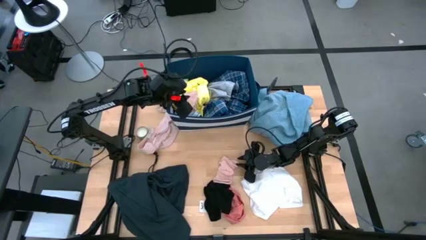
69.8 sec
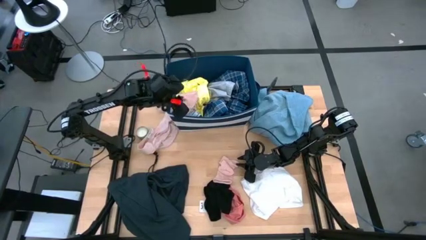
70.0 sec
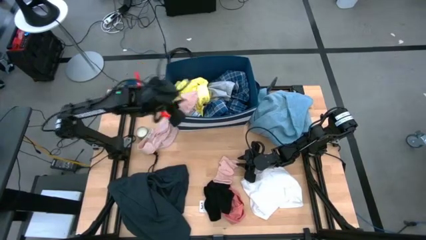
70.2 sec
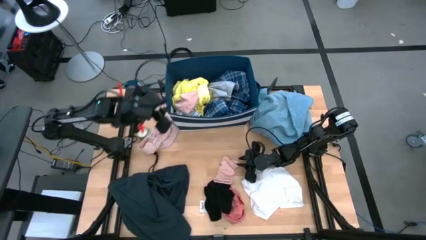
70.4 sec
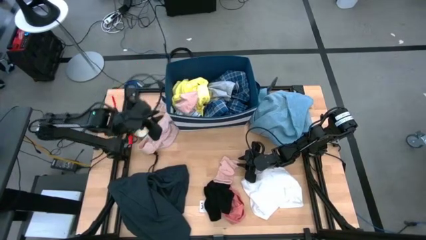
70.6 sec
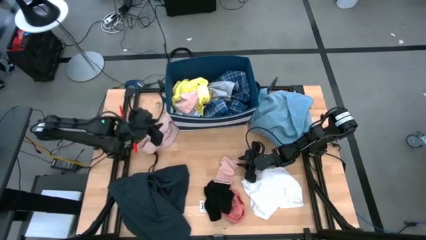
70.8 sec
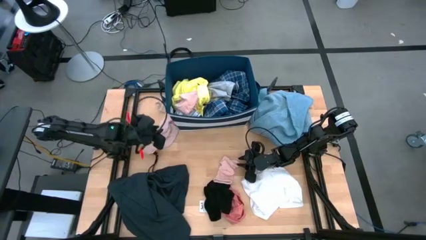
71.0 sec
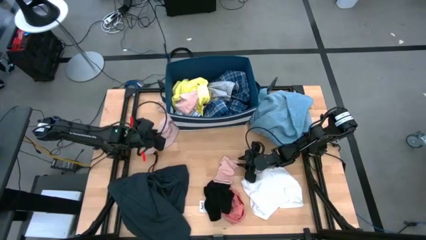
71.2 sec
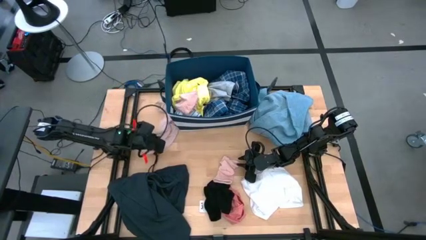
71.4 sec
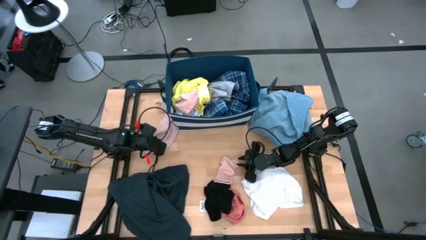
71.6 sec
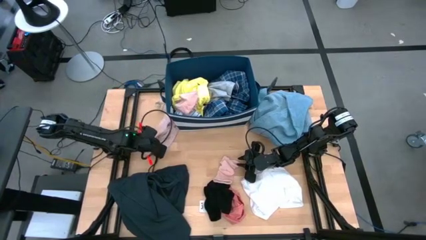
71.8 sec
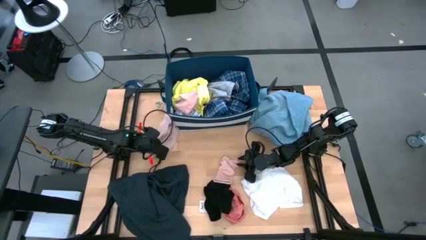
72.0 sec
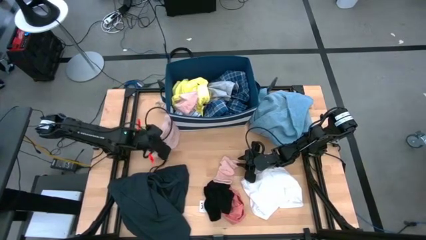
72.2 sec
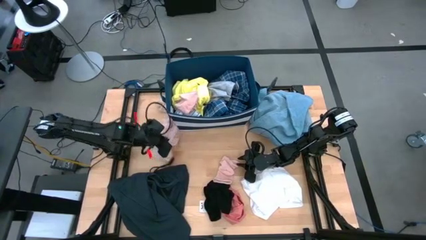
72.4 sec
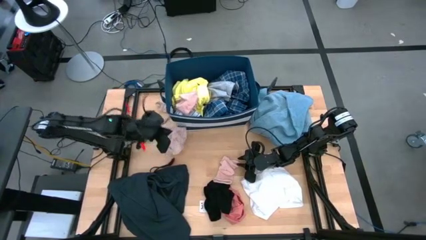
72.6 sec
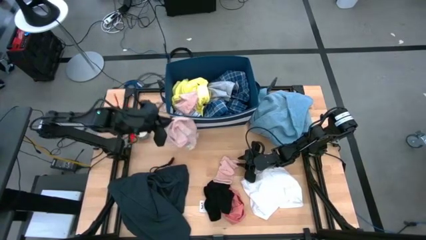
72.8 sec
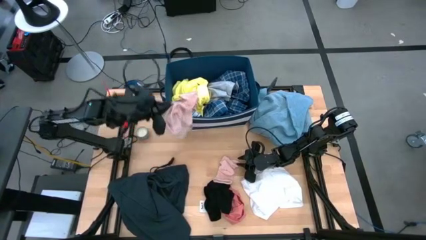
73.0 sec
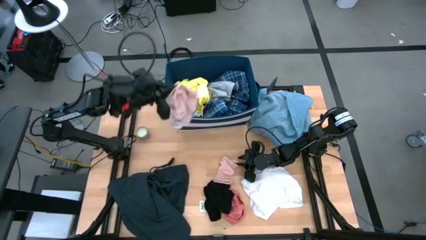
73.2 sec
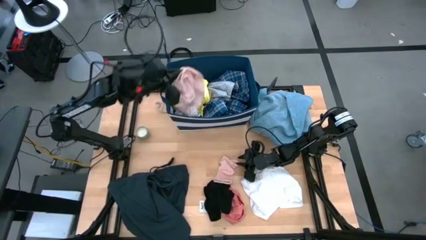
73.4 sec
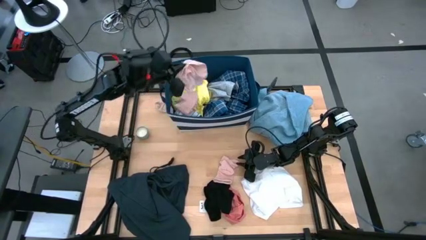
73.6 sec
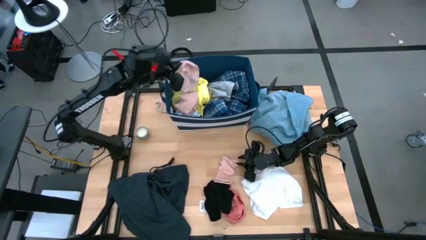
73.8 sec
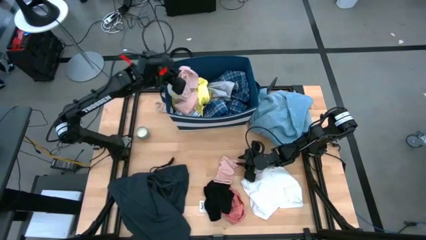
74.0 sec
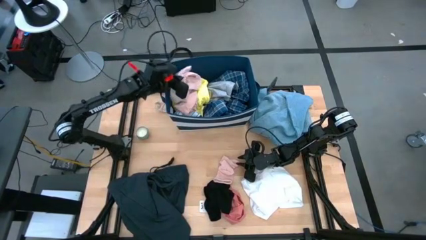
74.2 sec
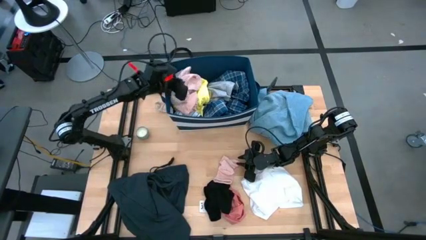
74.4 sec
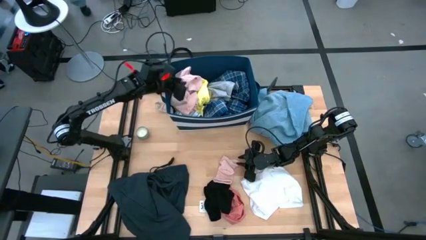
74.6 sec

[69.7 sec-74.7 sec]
Task: Sort clothes
Put the pink underwear into the blue laundry organizer

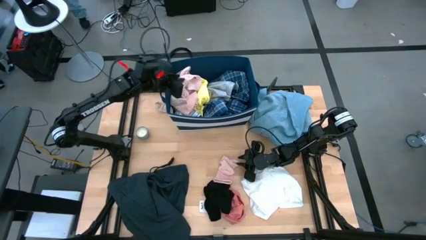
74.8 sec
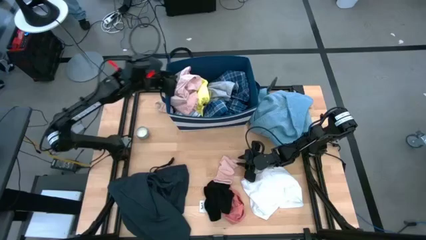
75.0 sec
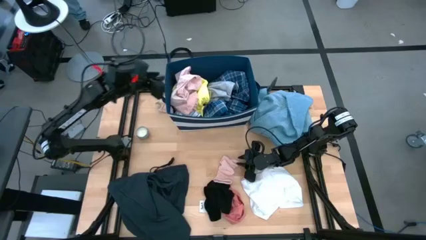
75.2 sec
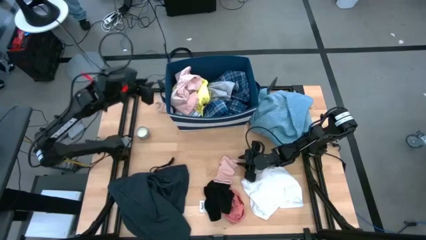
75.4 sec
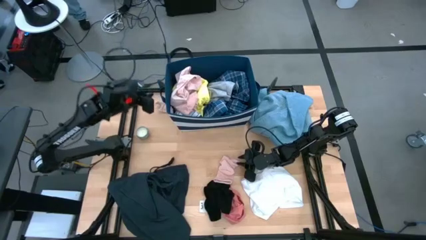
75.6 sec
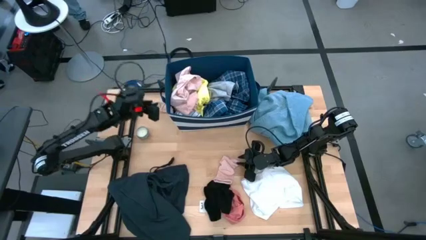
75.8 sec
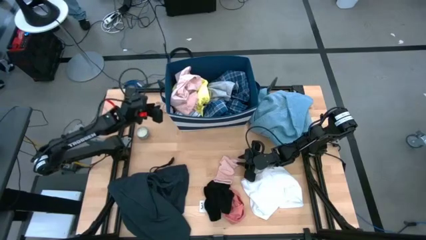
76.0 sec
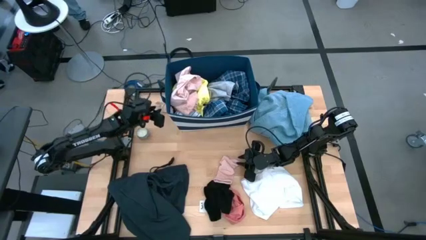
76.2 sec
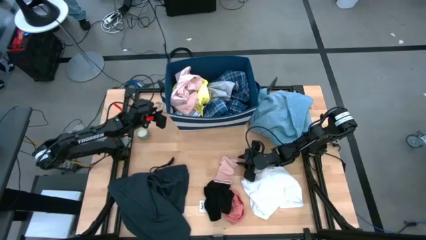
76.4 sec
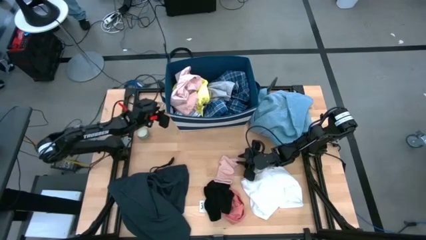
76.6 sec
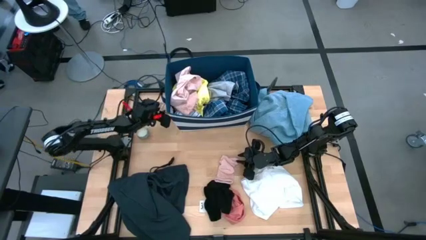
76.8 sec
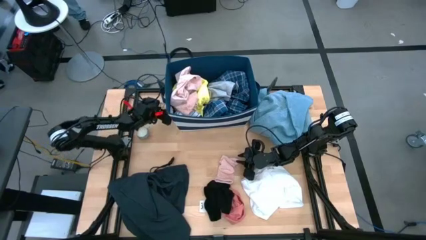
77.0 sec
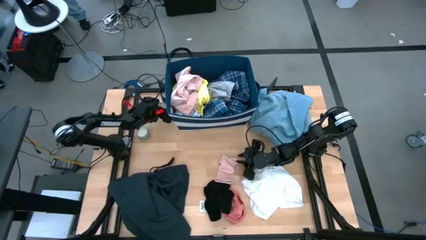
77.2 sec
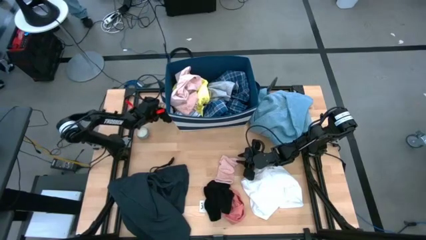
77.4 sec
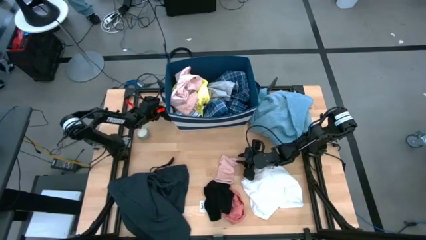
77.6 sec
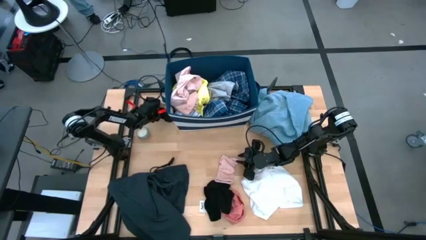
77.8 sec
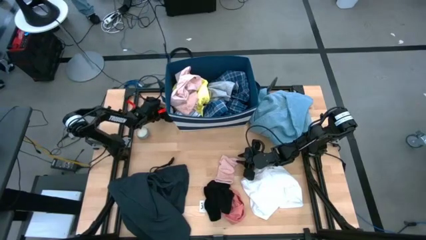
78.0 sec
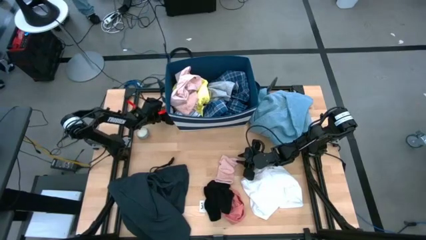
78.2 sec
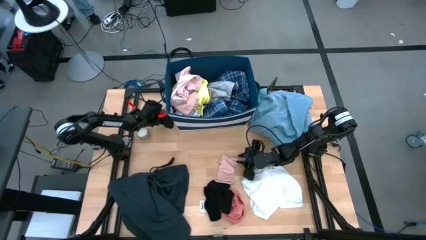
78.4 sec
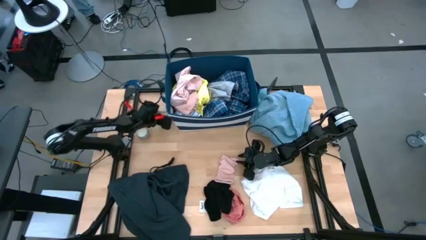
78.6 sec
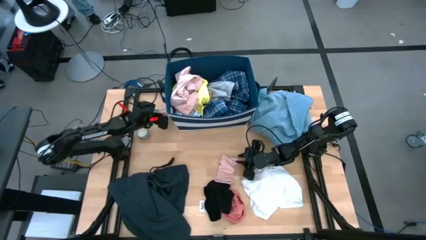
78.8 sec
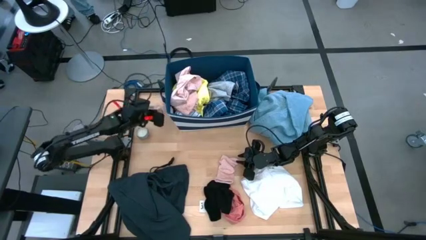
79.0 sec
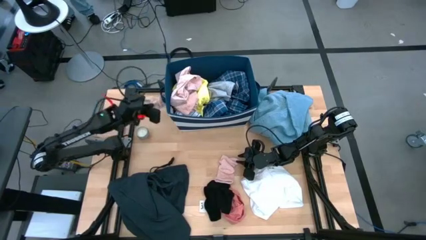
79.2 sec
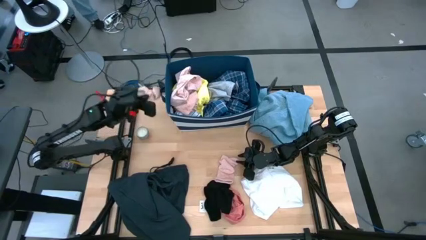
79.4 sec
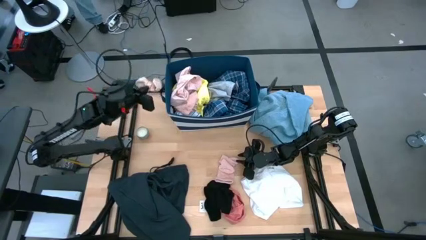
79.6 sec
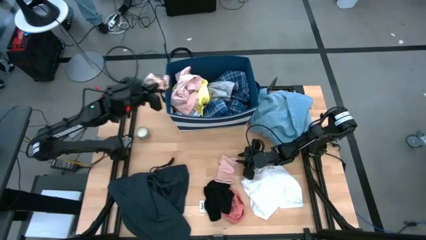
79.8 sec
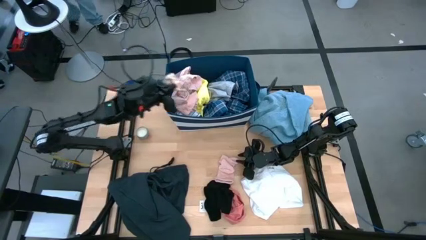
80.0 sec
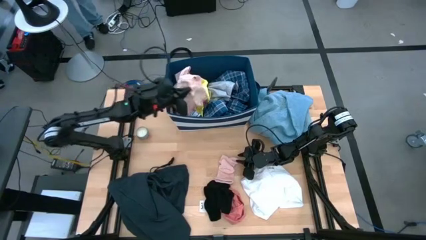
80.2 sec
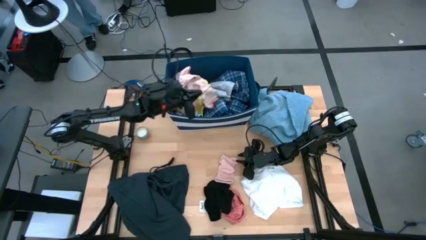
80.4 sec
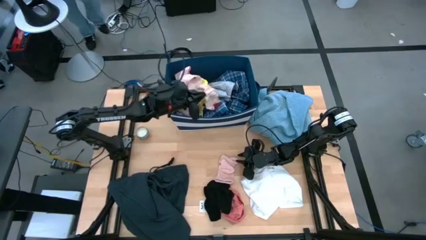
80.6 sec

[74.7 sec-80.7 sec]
Put the striped light pink sock into the blue laundry organizer

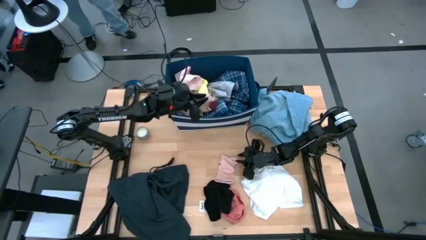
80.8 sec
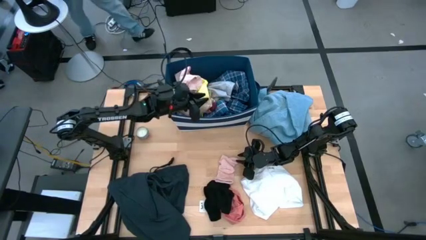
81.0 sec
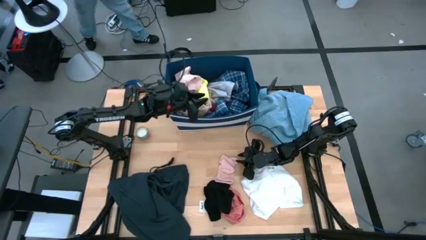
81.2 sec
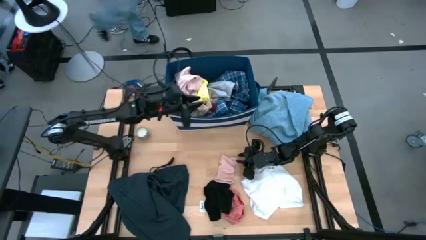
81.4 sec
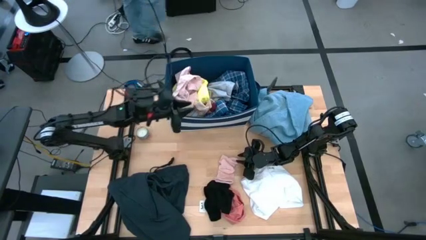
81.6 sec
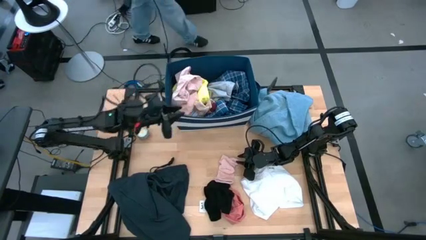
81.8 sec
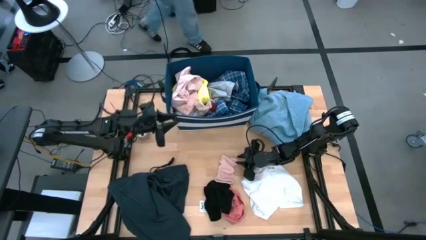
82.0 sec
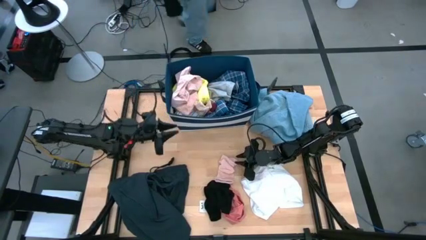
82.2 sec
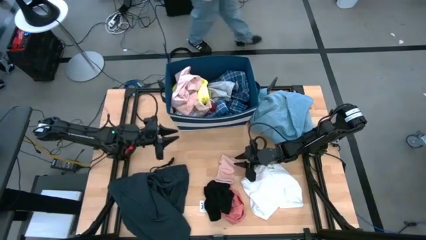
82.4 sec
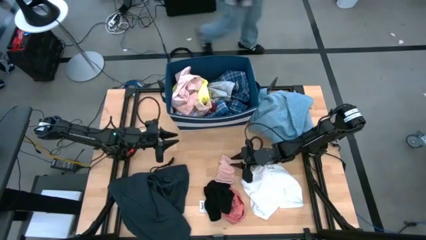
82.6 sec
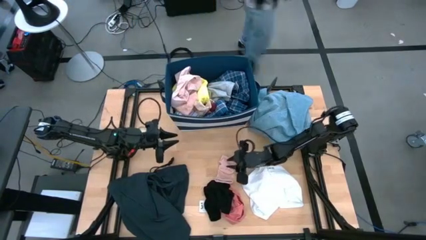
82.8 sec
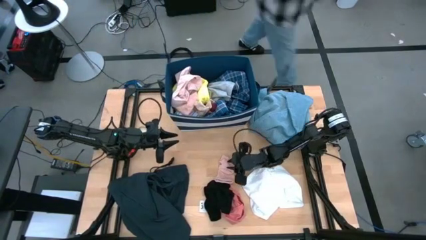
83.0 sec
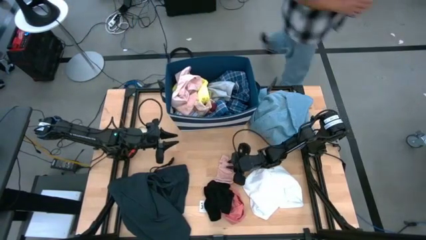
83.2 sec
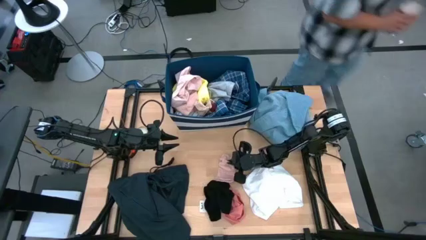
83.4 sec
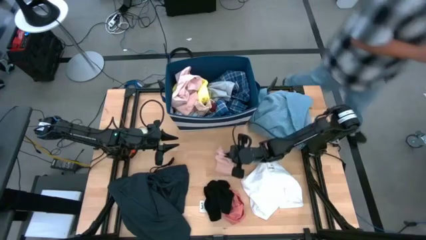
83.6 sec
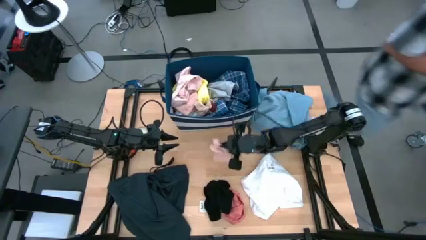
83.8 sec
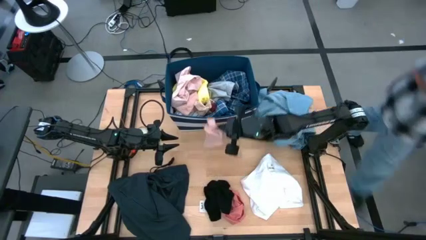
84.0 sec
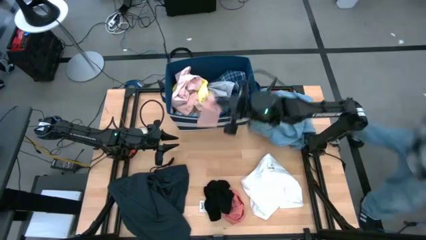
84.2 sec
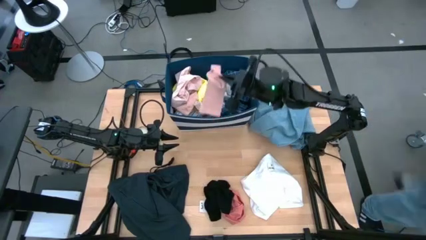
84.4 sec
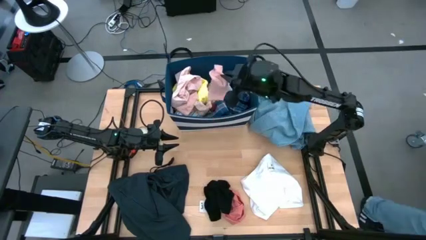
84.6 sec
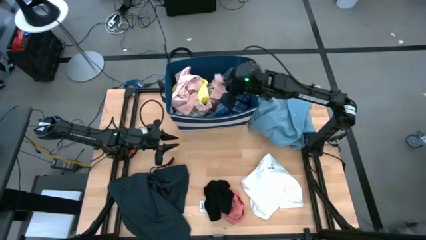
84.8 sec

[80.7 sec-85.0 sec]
Put the pink sock into the blue laundry organizer

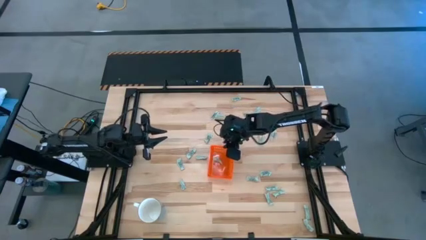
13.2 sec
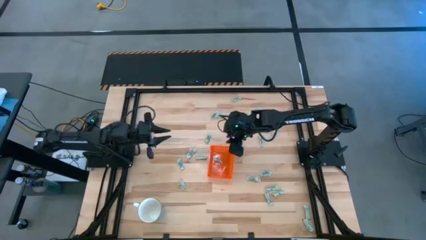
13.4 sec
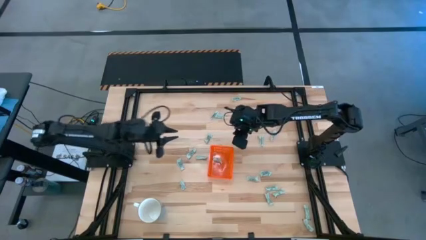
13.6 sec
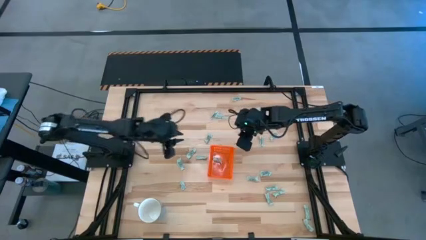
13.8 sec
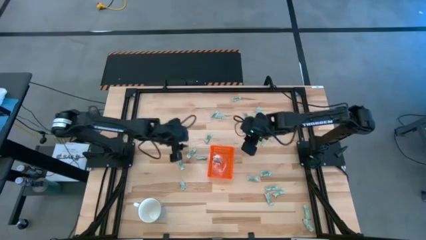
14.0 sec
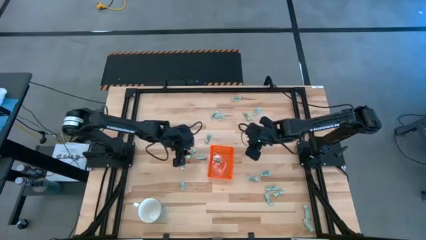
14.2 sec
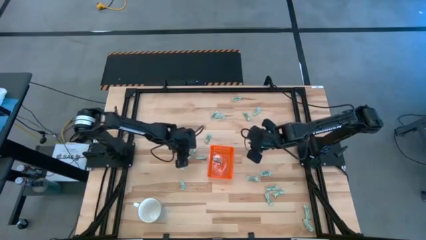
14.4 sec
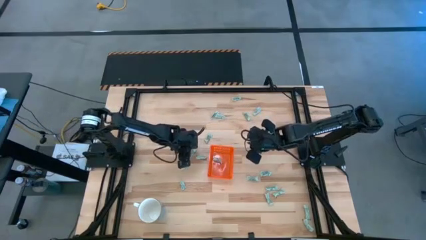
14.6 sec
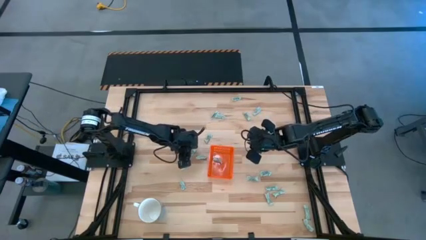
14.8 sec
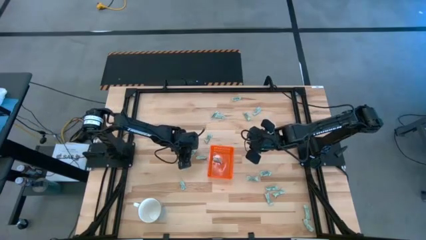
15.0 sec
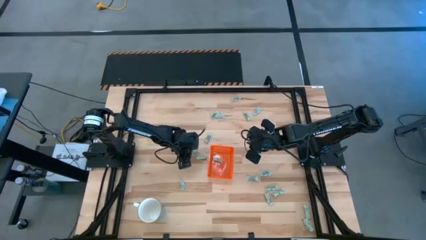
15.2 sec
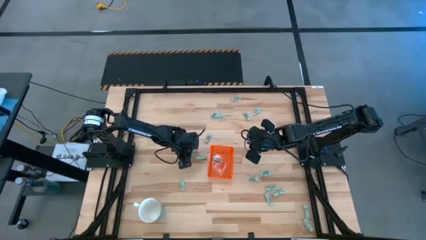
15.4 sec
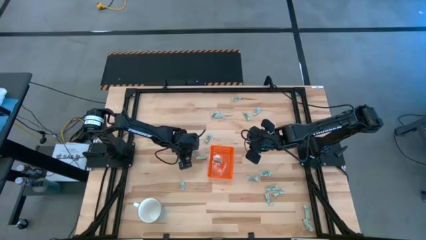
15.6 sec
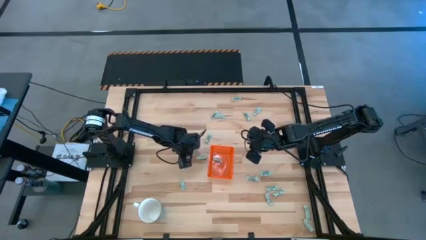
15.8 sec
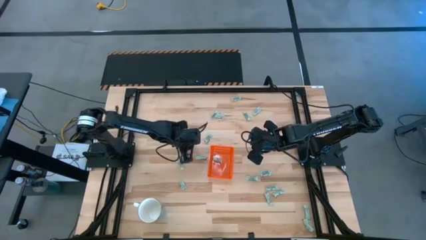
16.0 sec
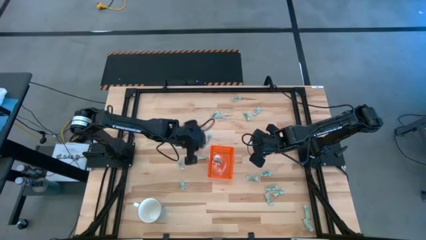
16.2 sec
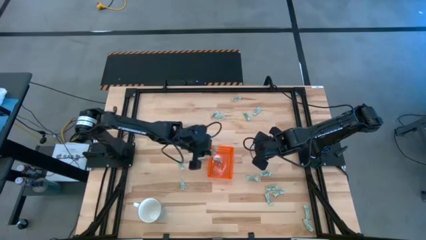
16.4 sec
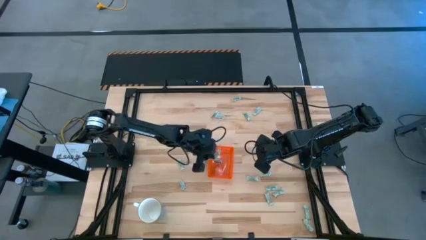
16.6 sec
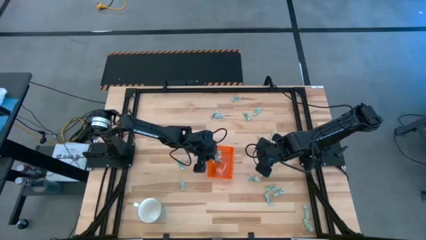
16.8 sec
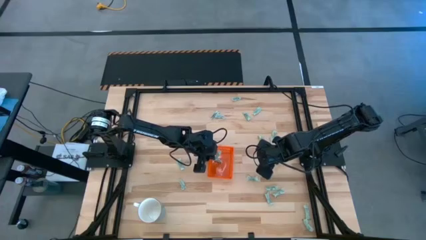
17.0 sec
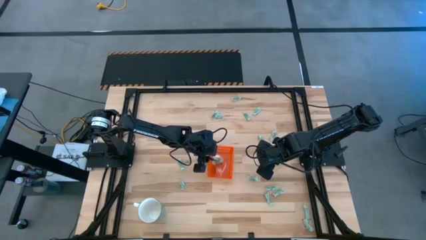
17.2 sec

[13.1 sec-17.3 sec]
Task: Pick and place Stevia / Truvia into bins
Put the stevia packet into the orange bin
